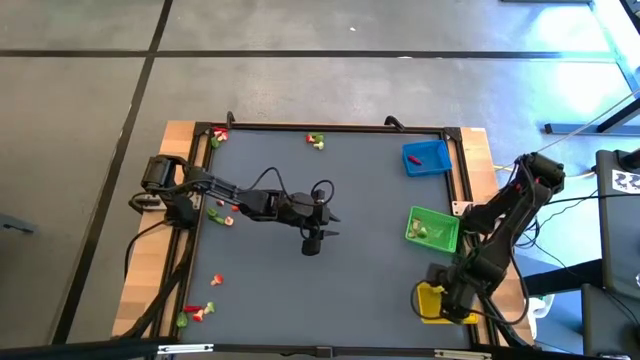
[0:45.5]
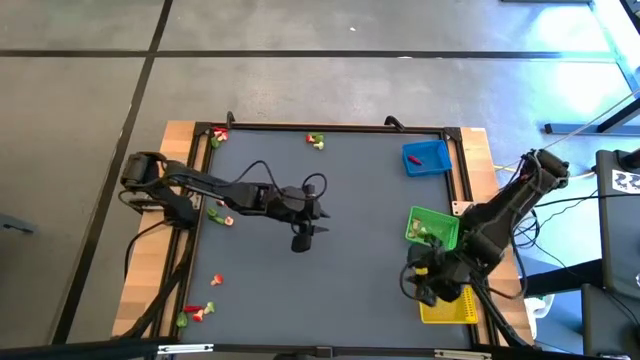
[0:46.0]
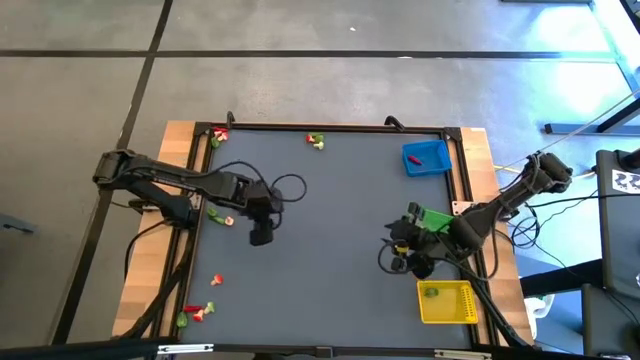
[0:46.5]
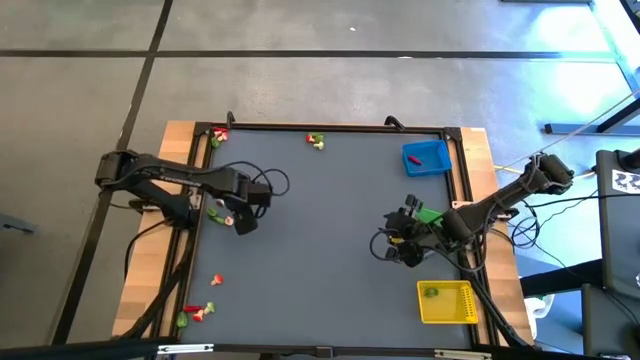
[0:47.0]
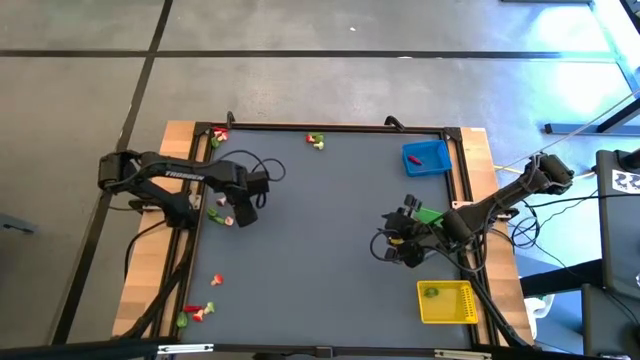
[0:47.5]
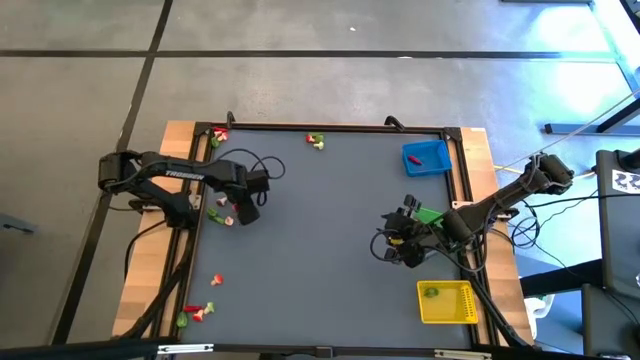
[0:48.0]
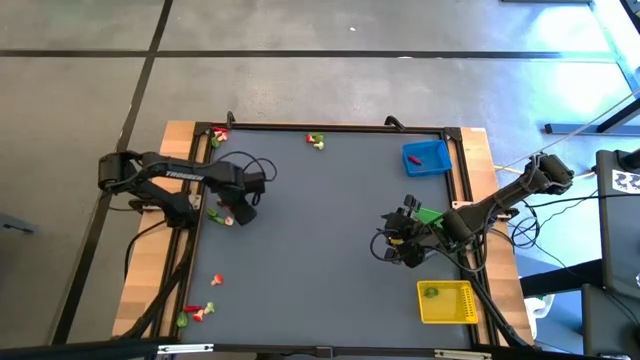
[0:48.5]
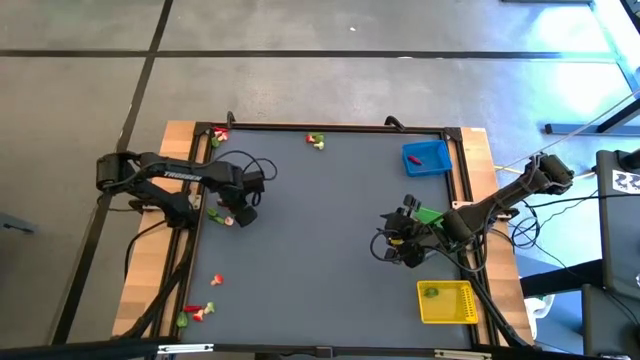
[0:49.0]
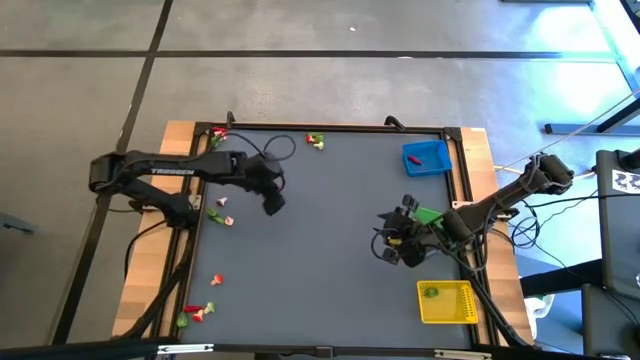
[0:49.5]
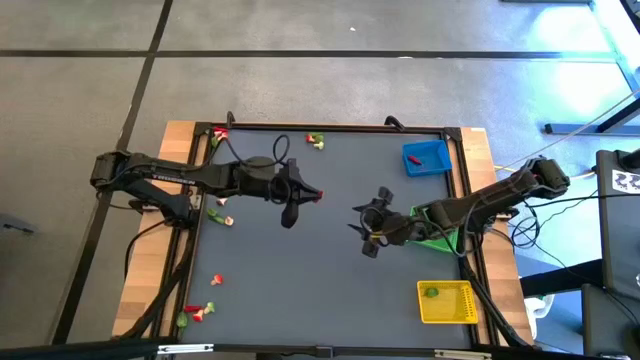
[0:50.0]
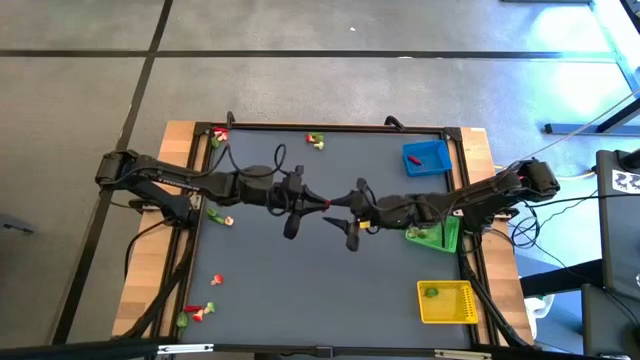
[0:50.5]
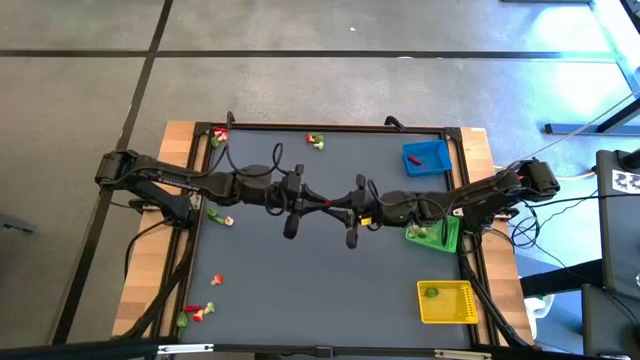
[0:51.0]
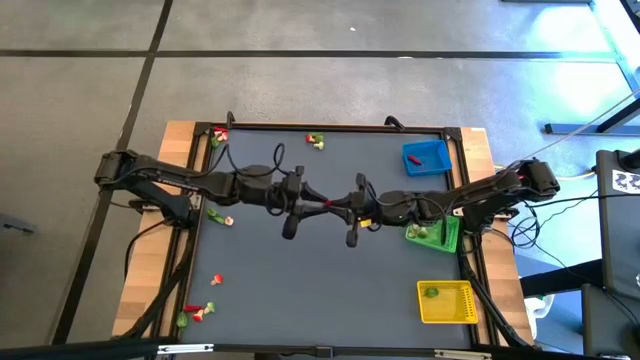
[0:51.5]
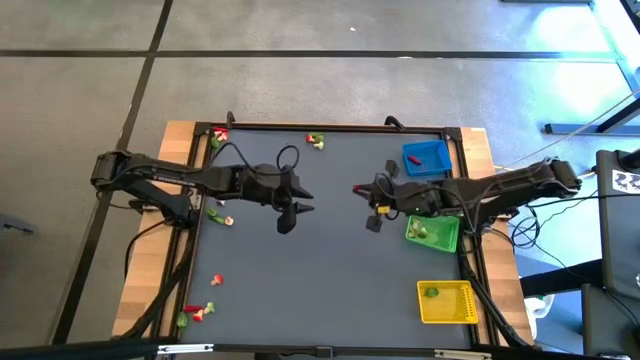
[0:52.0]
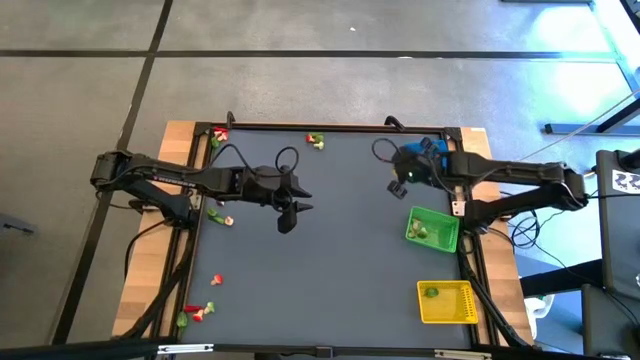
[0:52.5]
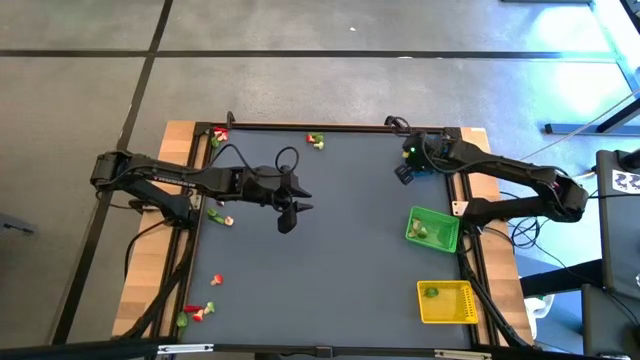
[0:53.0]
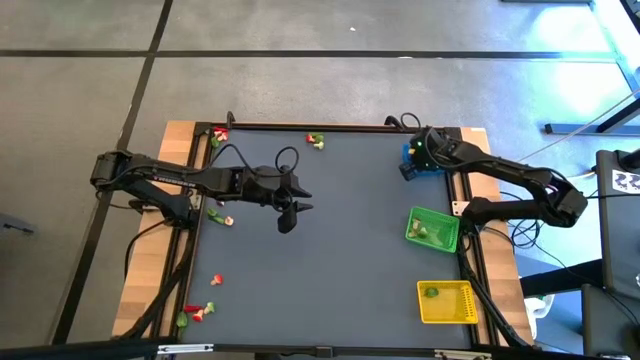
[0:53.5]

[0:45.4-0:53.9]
Task: Sort produce into baskets
Put the red chili pepper into the blue basket

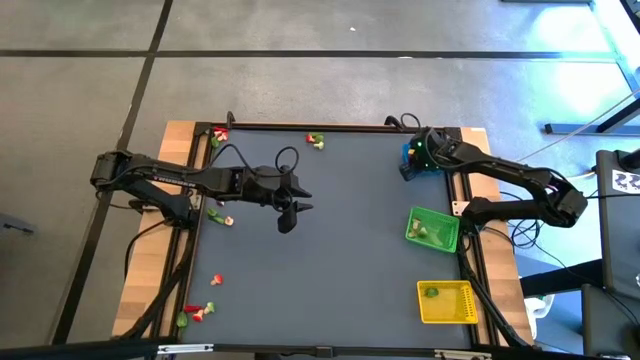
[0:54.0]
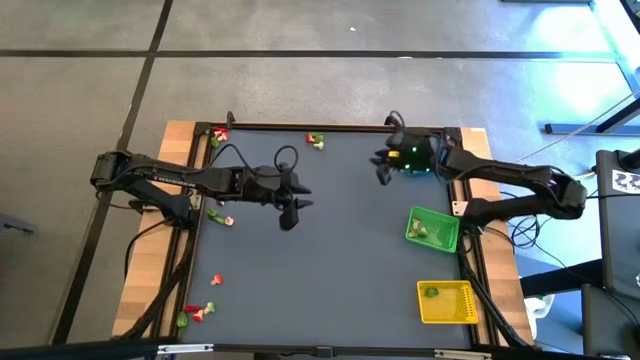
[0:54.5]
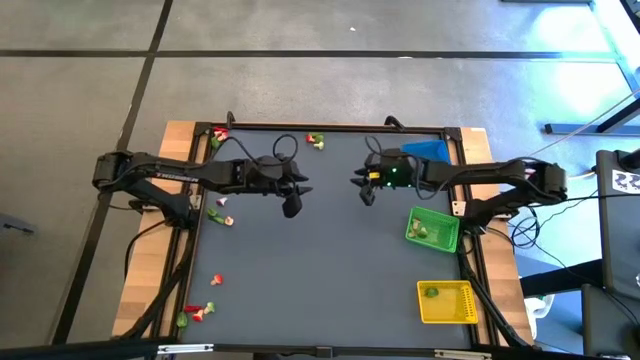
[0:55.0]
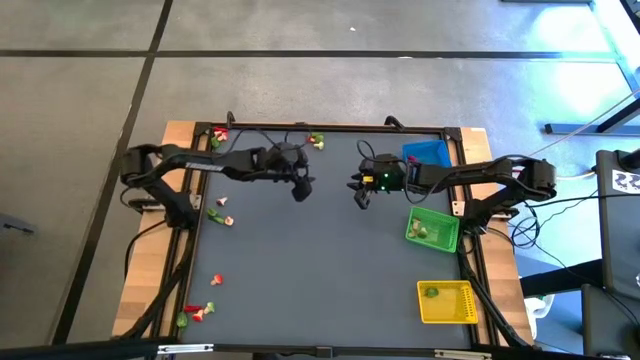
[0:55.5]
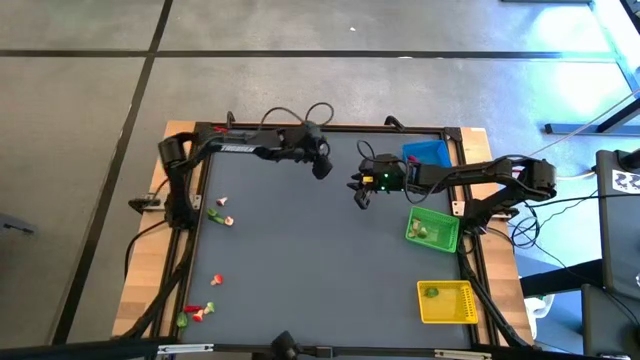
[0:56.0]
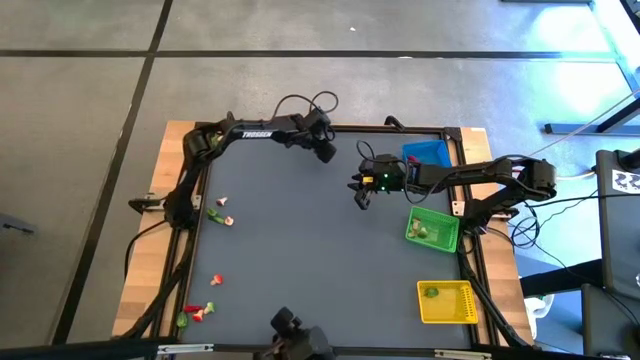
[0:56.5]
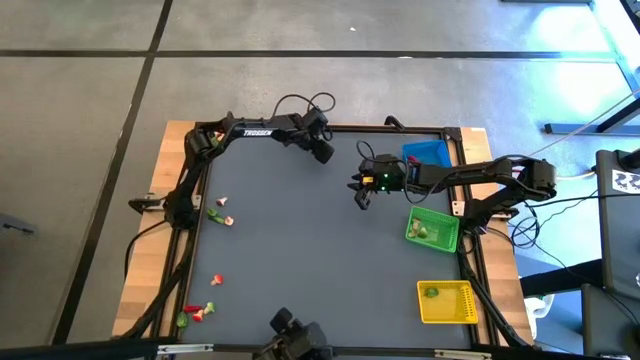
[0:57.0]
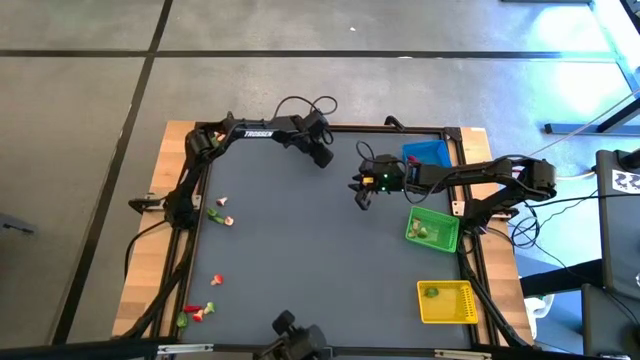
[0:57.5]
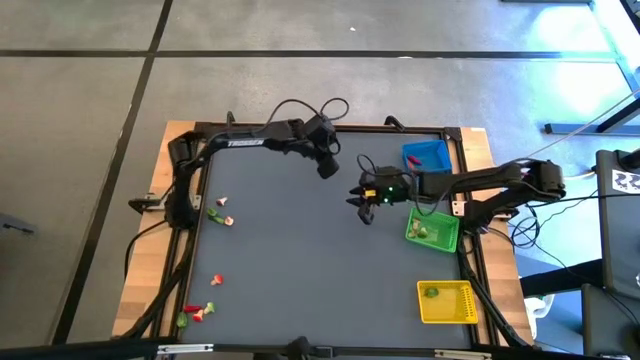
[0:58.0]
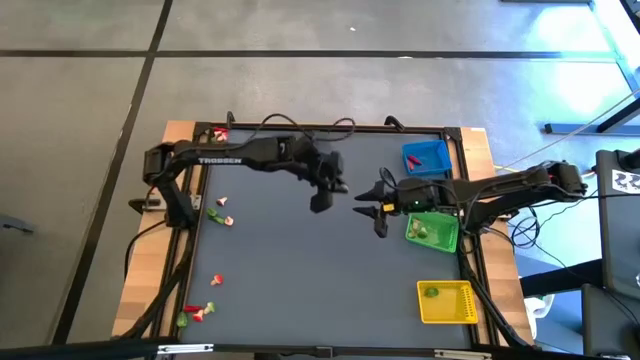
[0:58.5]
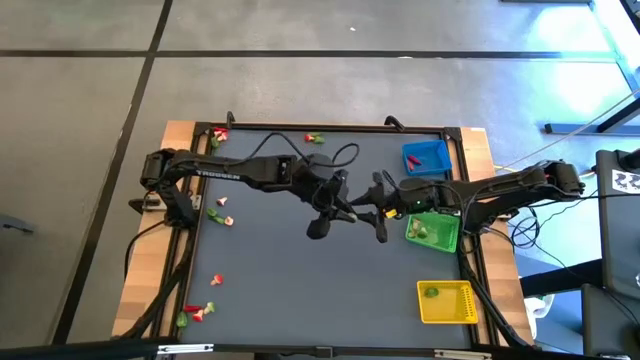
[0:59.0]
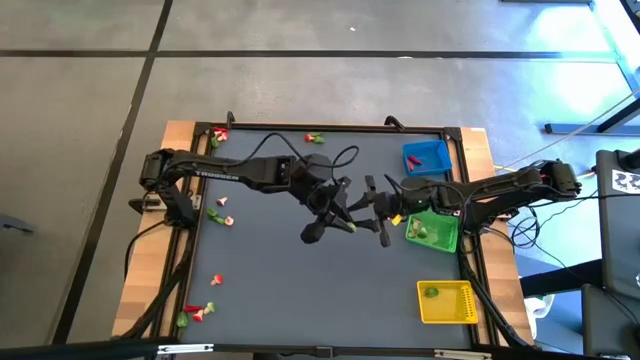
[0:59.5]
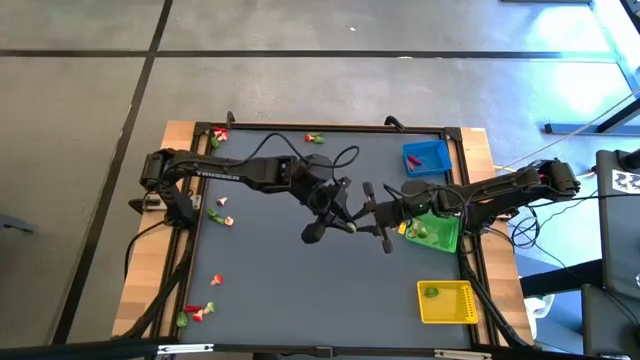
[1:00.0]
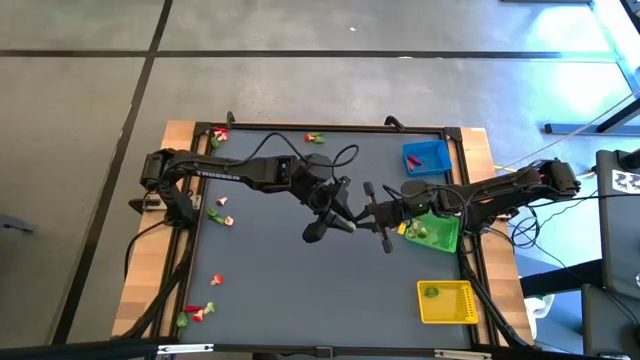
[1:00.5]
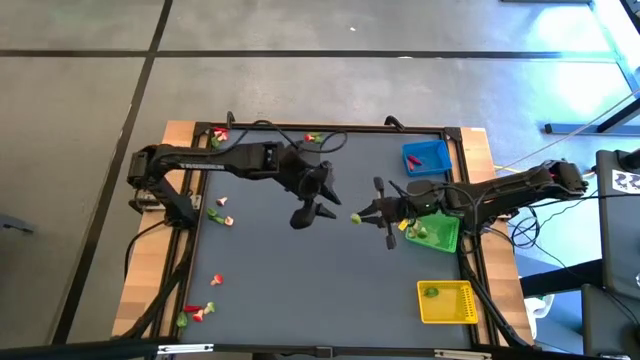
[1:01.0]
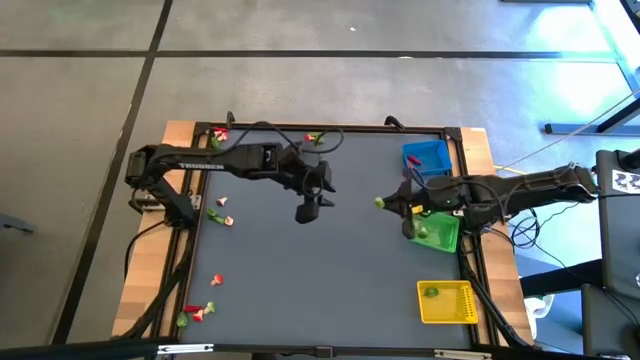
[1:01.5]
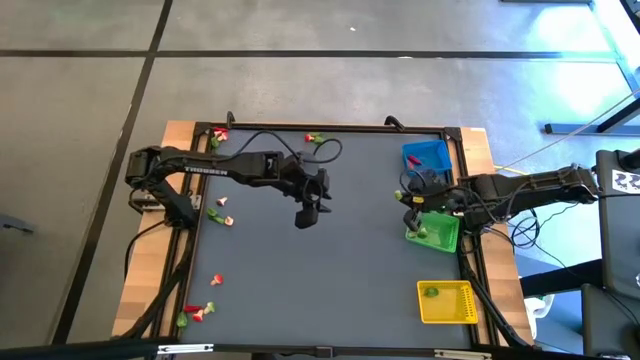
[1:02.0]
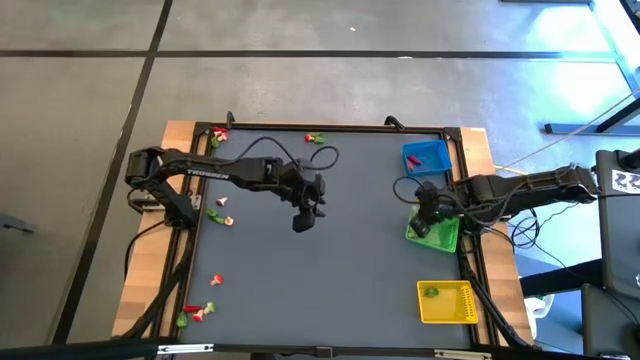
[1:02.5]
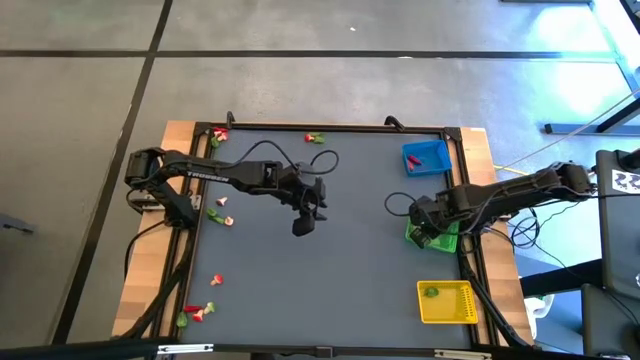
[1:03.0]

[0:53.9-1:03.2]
Put the green mushroom into the green basket

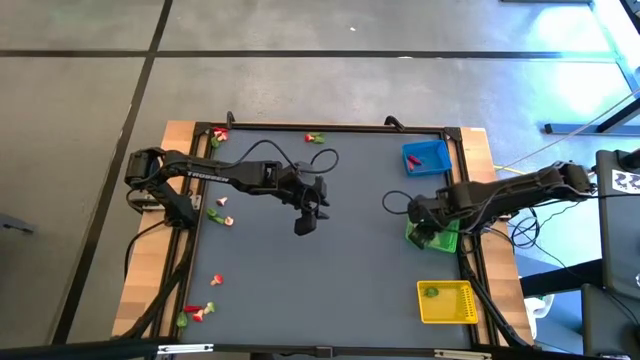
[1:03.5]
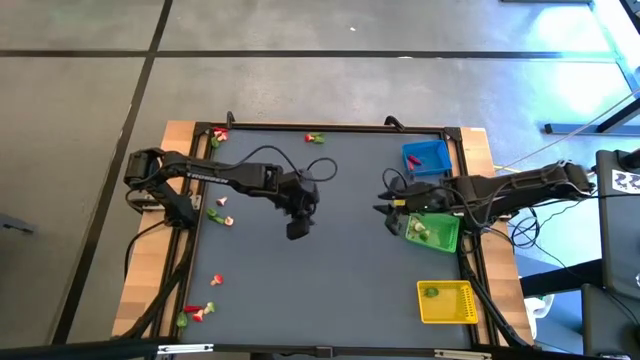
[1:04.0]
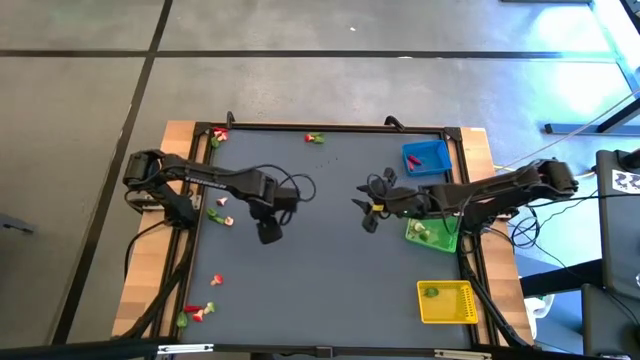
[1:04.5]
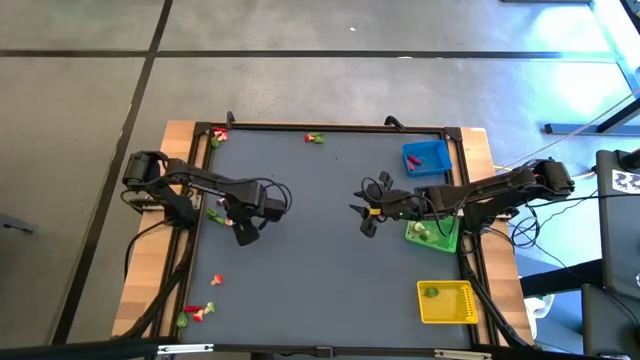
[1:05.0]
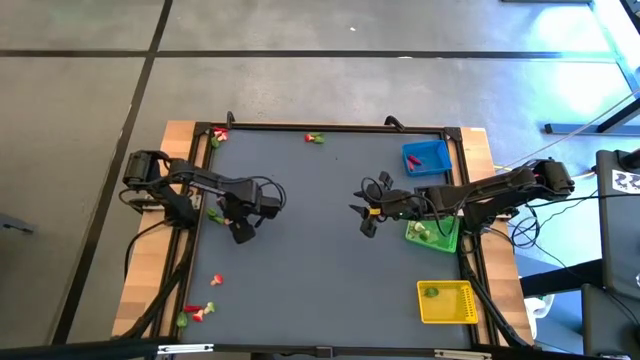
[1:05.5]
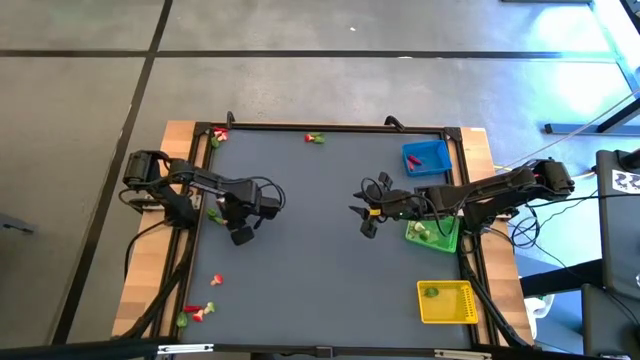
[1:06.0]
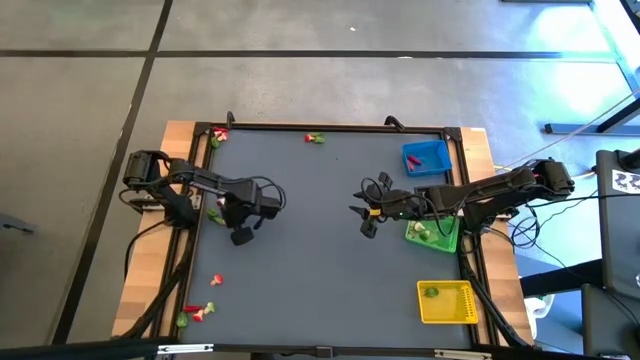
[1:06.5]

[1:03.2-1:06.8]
Put the brown mushroom into the green basket
